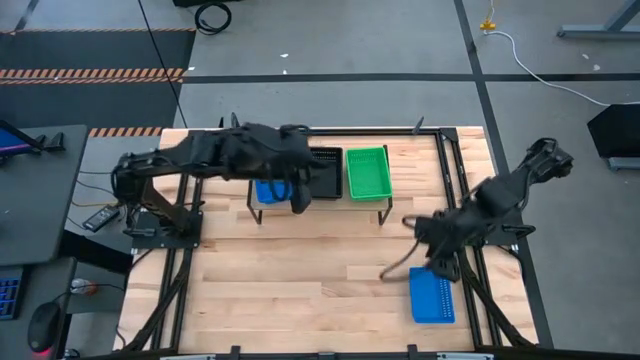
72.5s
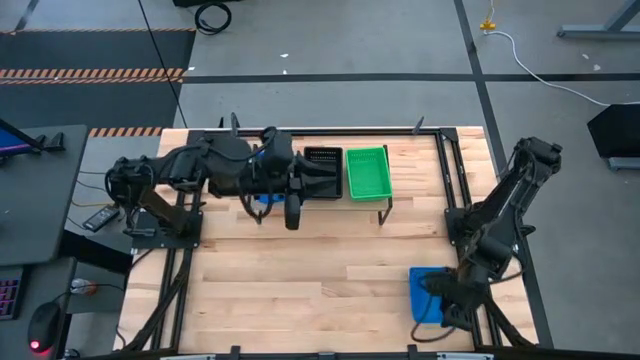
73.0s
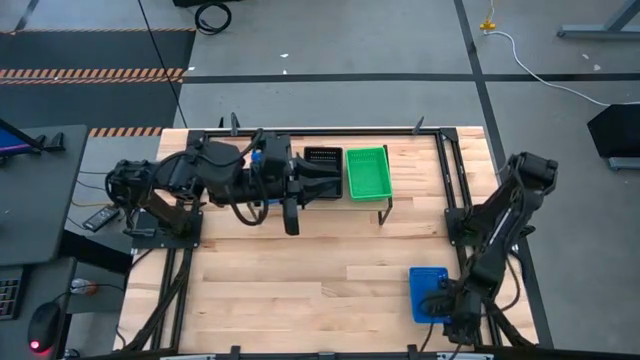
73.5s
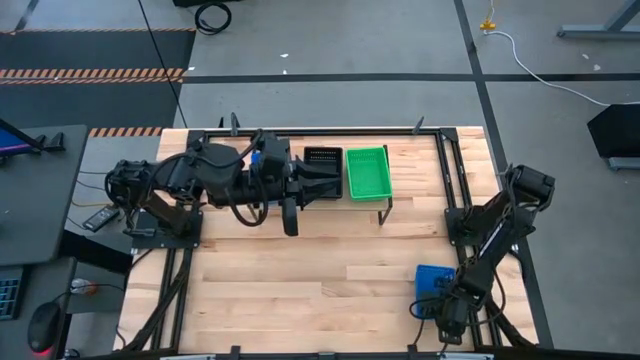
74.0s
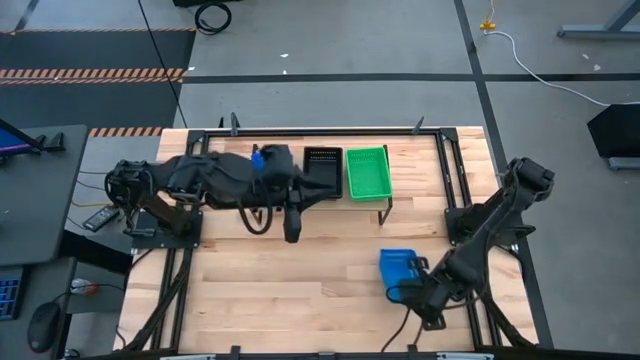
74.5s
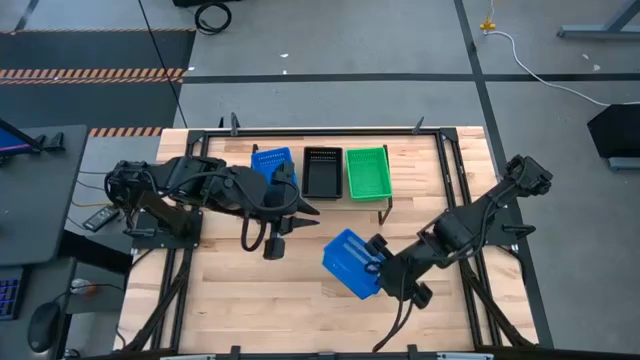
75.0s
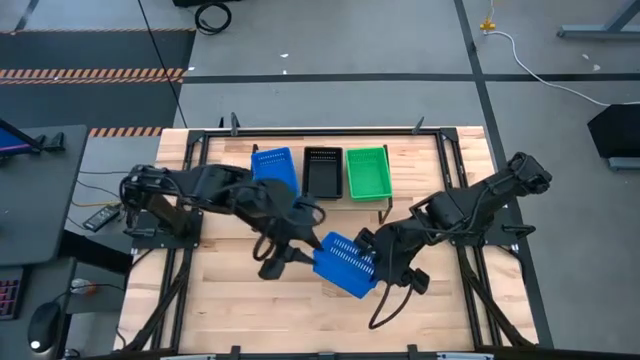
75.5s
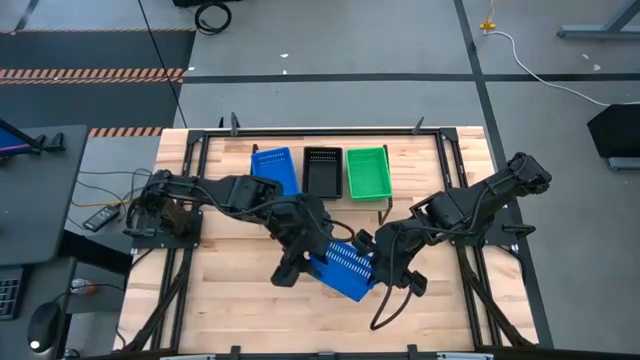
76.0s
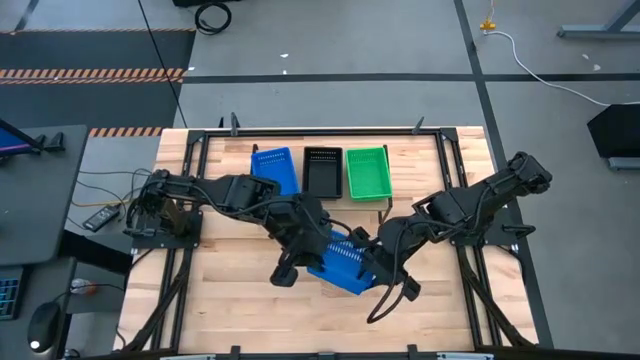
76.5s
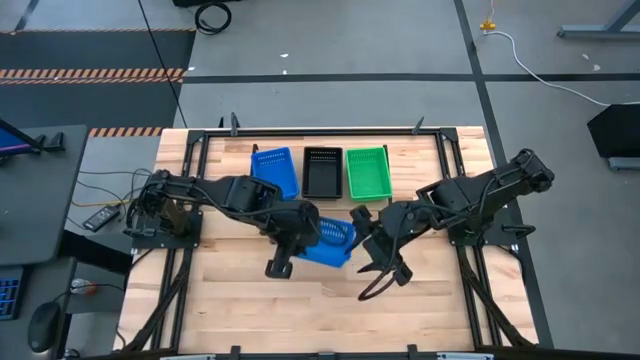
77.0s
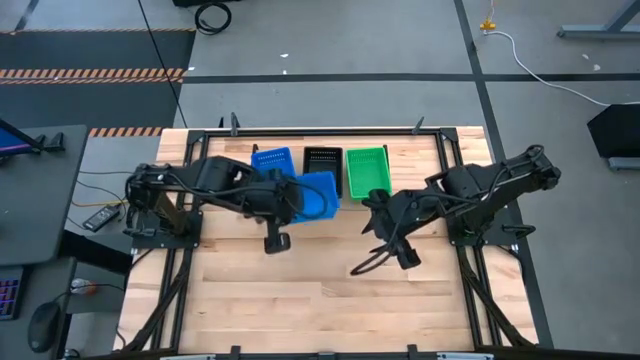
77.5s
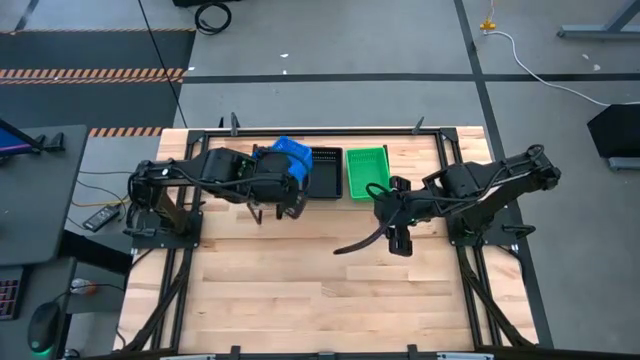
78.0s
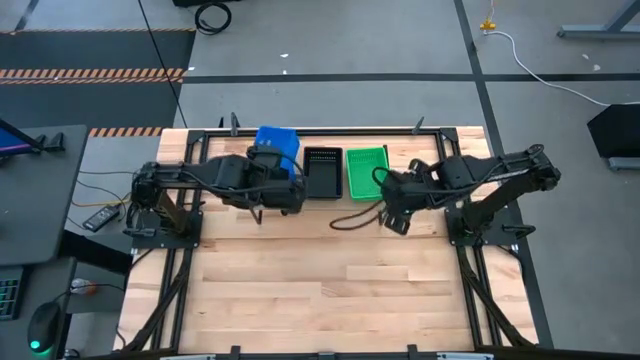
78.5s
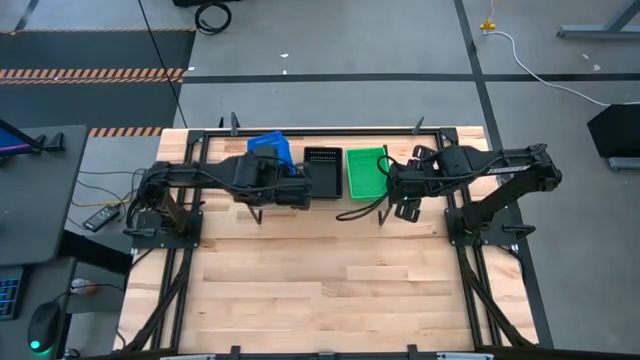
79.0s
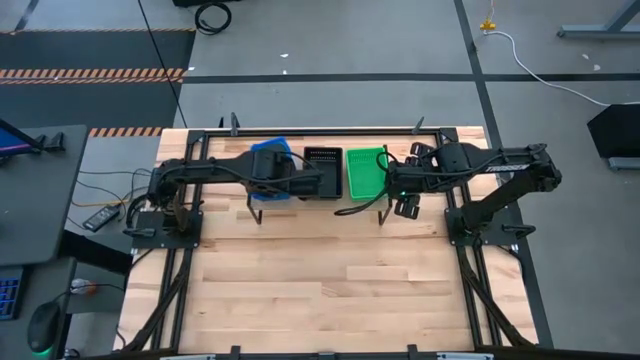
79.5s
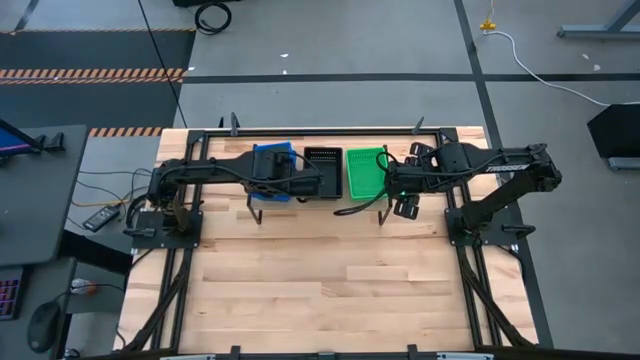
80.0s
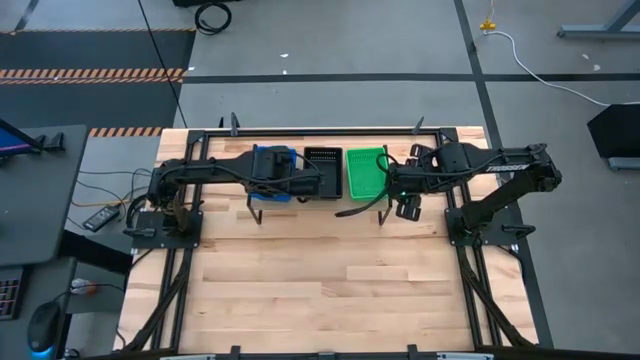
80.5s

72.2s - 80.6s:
Task: Stack baskets on shelf by color
Stack the blue bin on top of the blue bin on the shelf

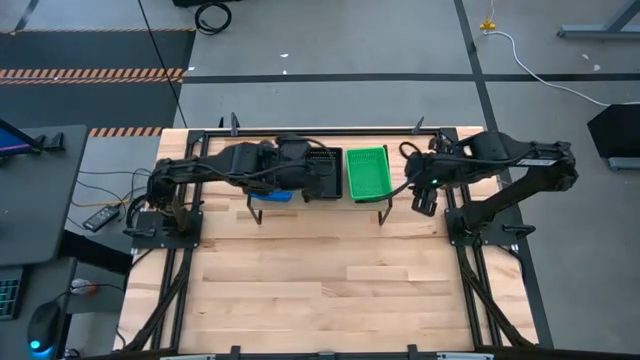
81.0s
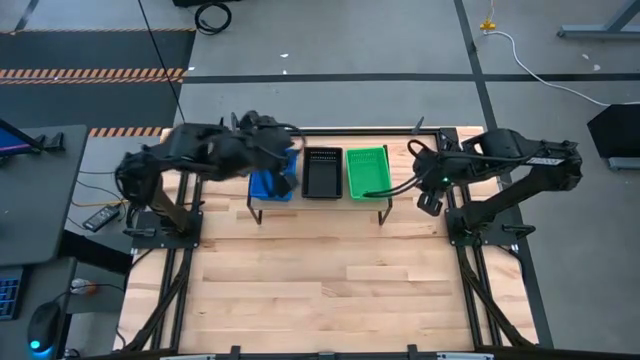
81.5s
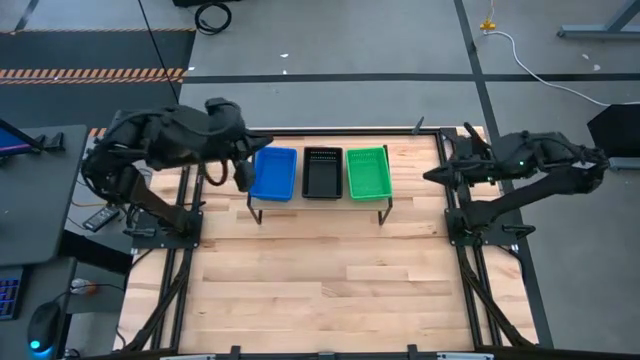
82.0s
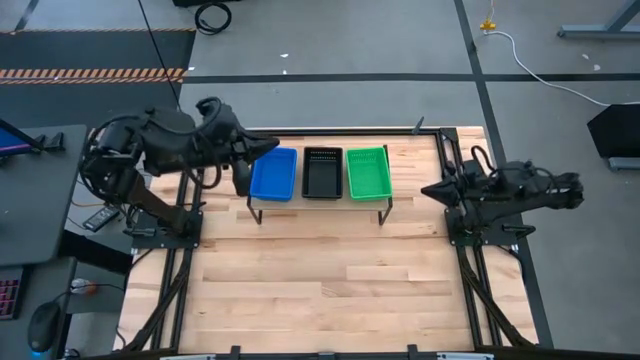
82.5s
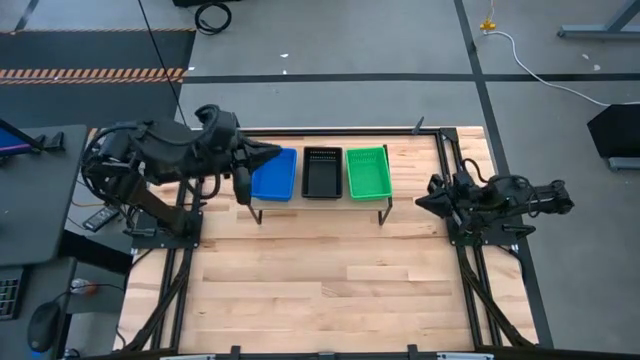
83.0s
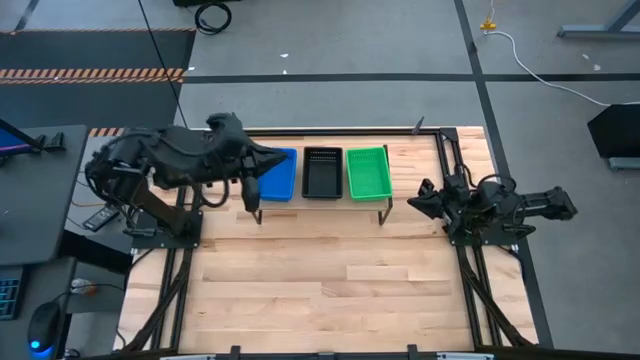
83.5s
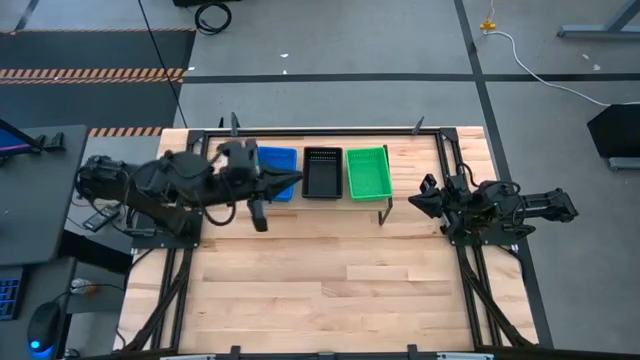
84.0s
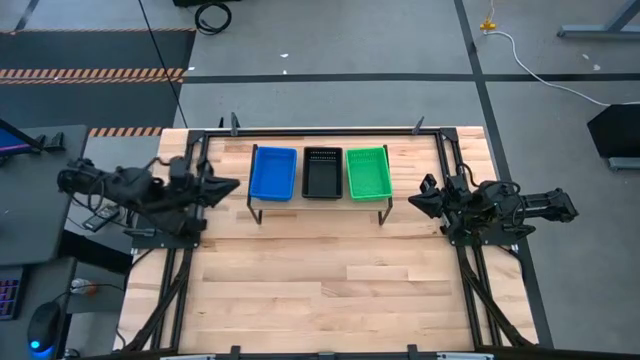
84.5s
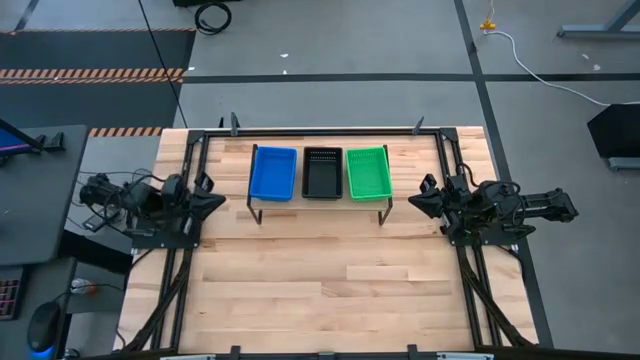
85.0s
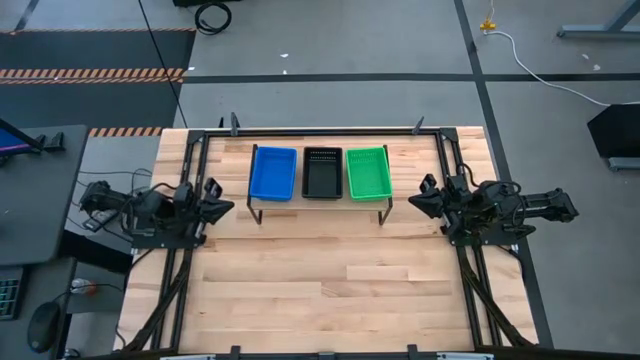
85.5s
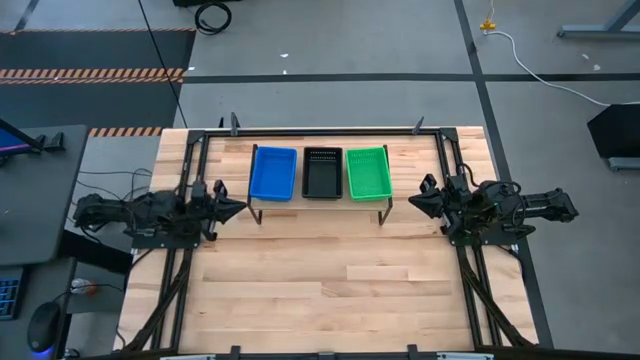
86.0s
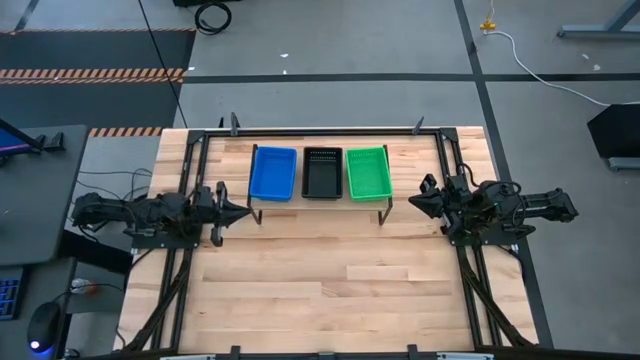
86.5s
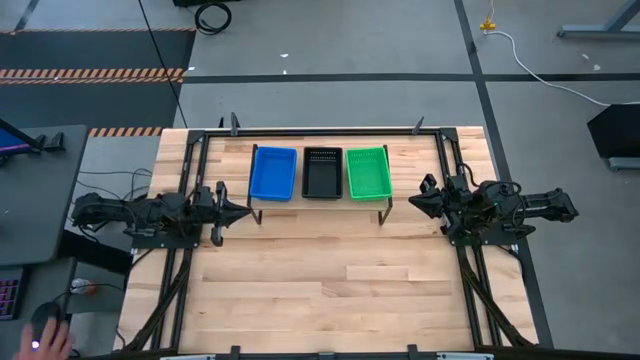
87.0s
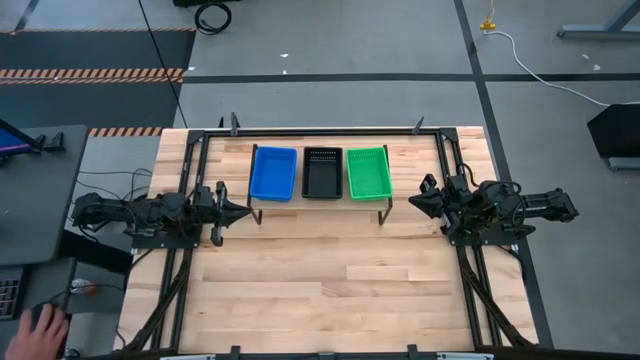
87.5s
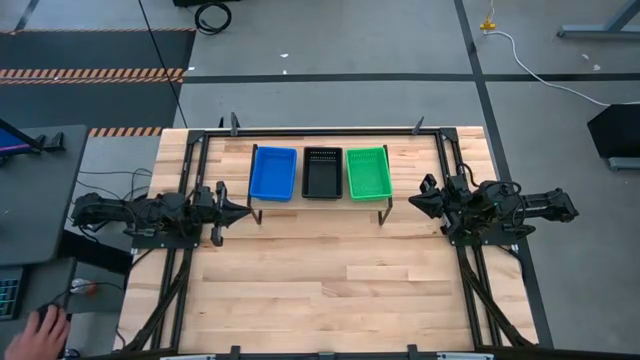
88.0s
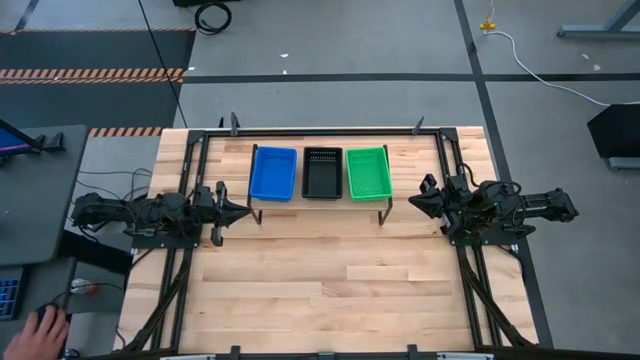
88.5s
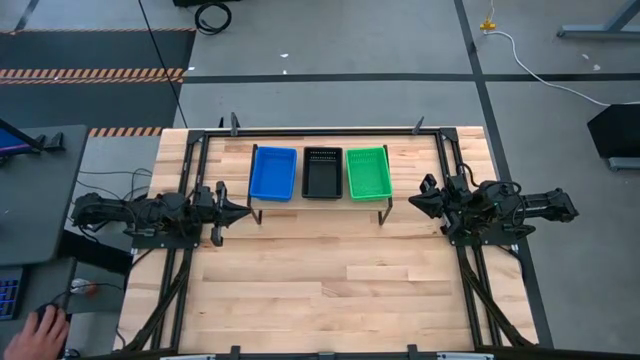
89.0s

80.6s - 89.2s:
Return to Home Position

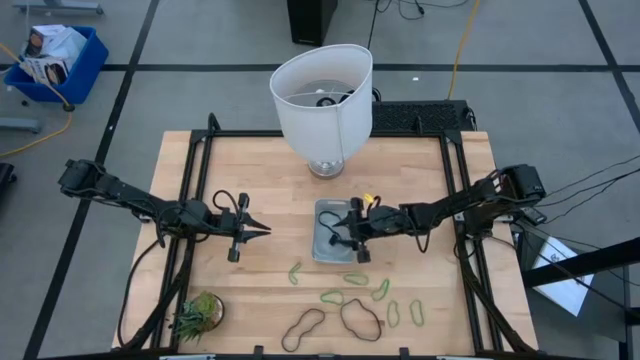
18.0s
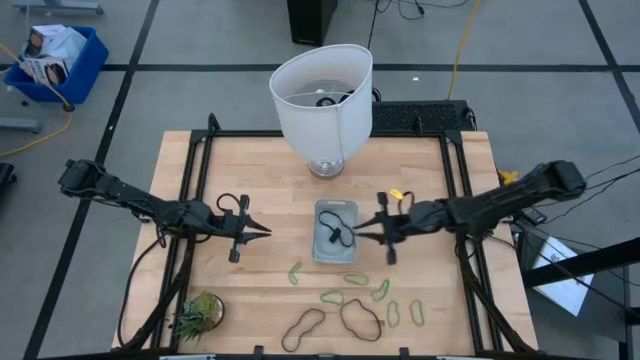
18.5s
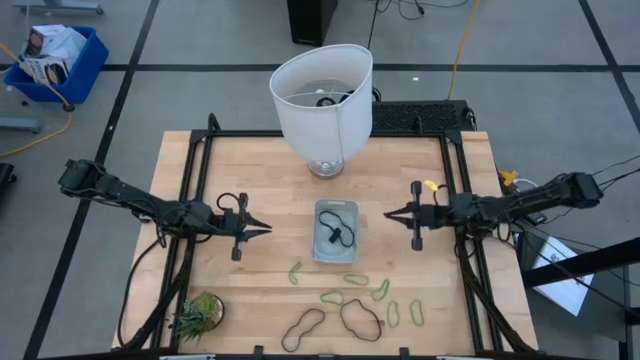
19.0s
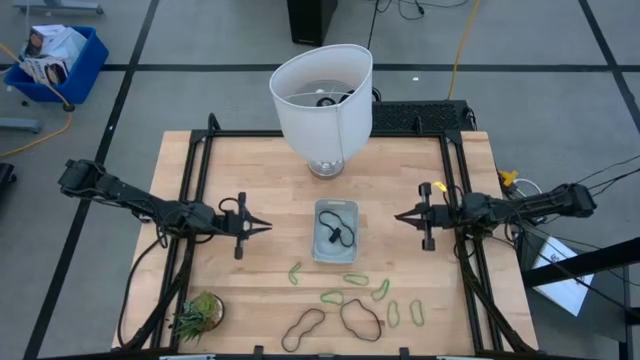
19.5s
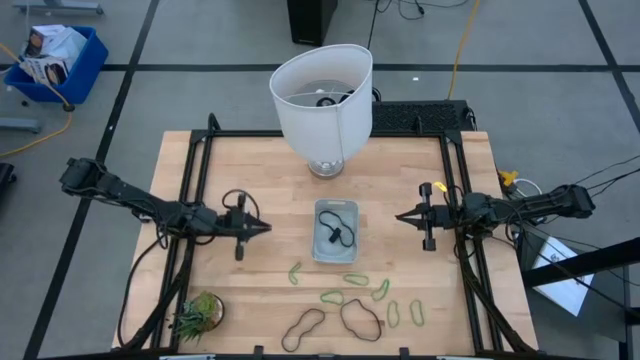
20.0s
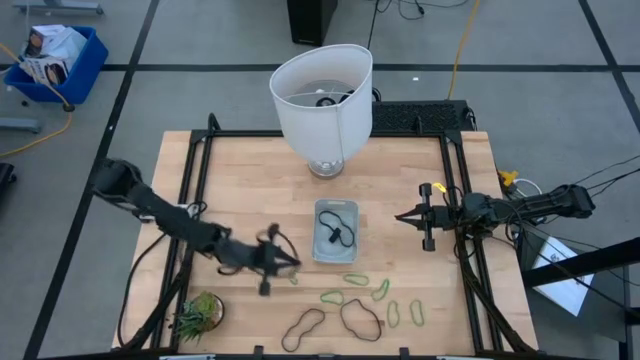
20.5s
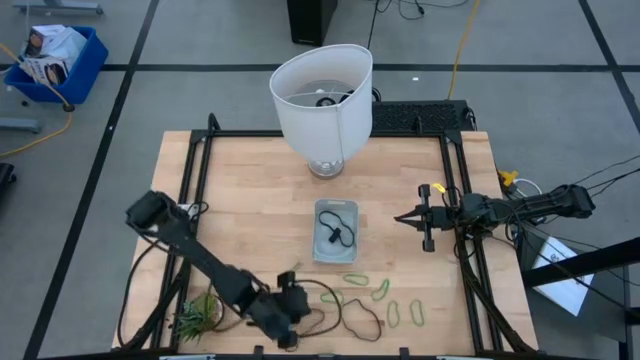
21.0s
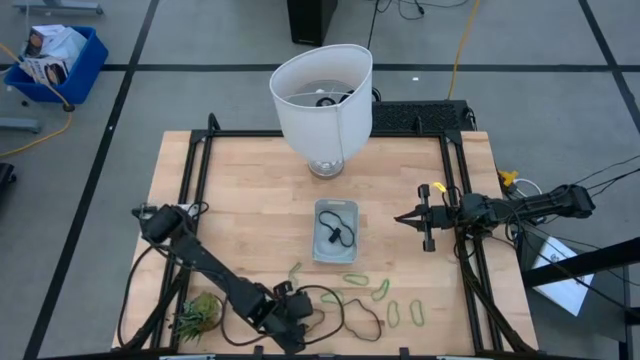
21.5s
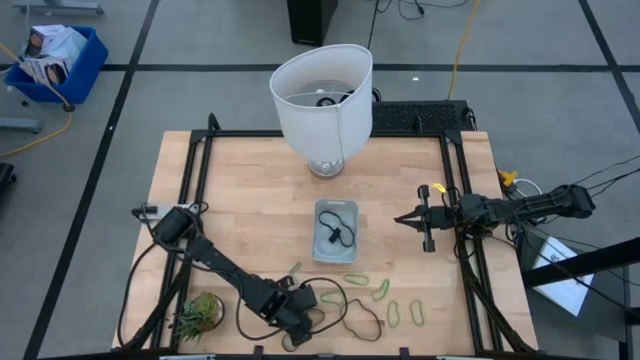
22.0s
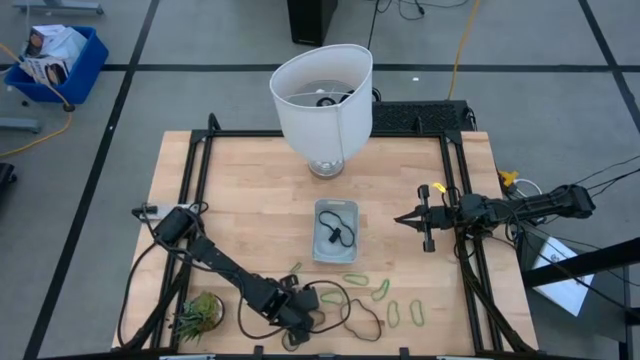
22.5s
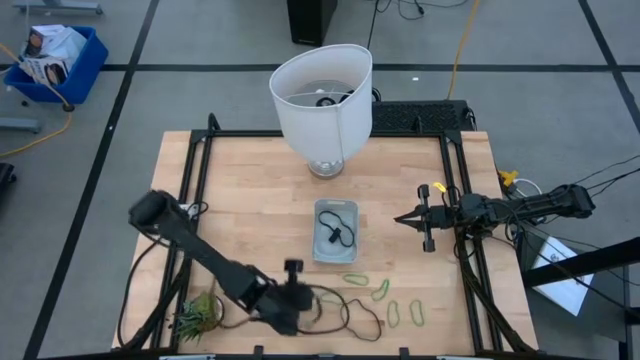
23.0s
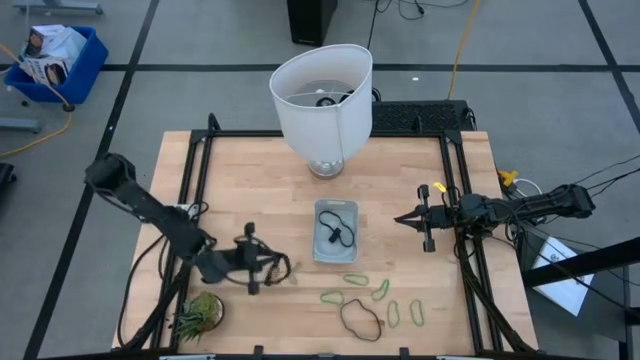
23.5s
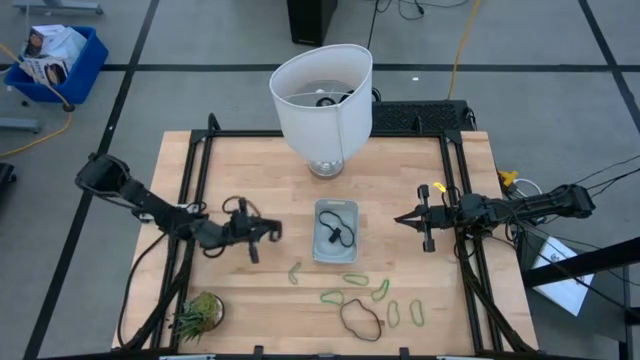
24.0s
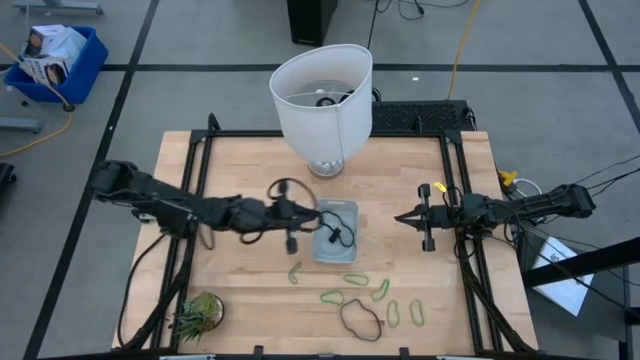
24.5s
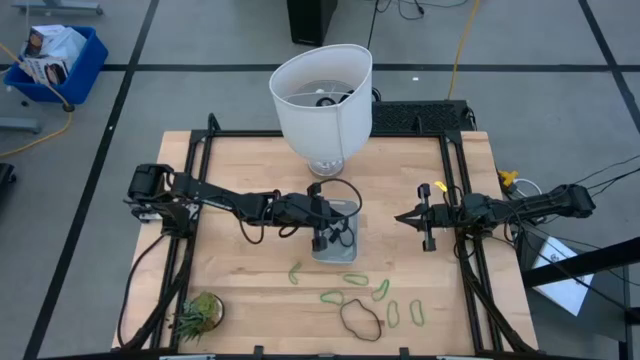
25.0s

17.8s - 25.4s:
Task: Pick and place rubber bands into bin
Put the black rubber band into the gray bin
